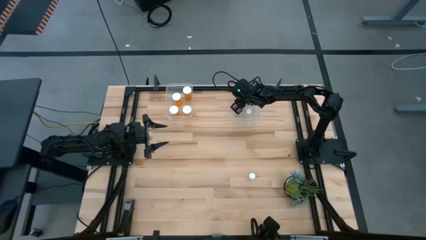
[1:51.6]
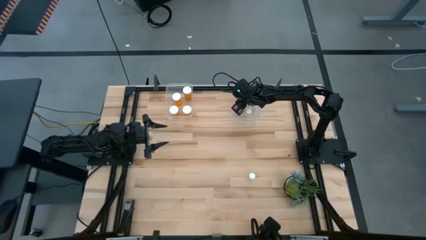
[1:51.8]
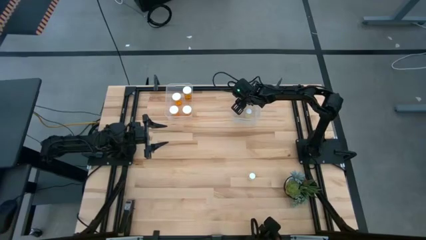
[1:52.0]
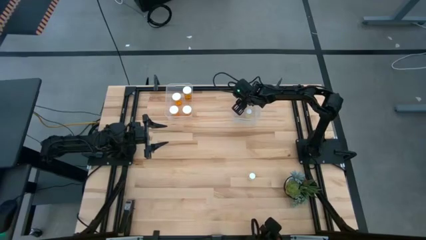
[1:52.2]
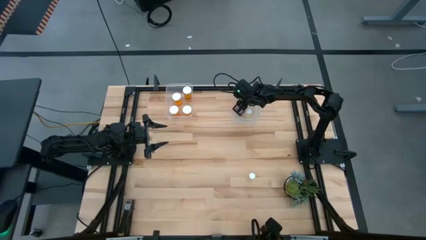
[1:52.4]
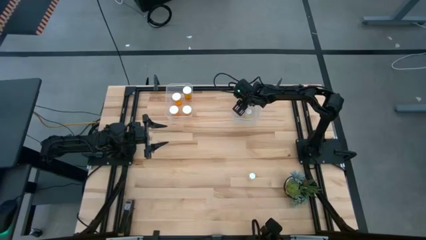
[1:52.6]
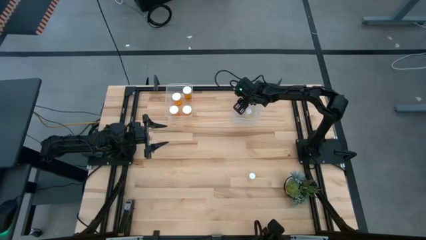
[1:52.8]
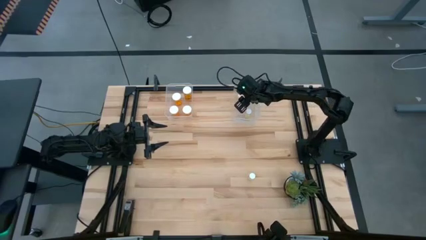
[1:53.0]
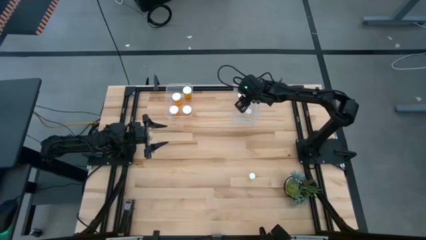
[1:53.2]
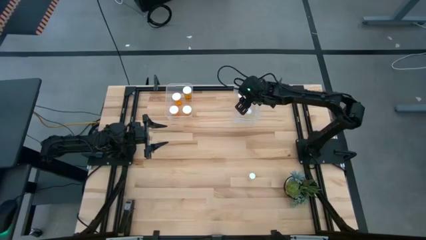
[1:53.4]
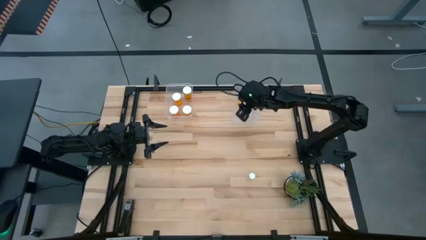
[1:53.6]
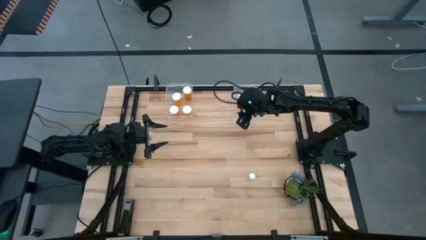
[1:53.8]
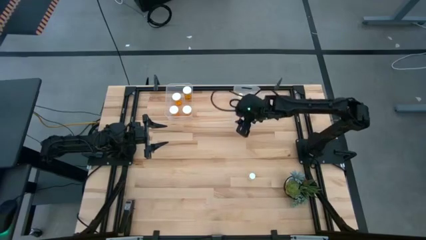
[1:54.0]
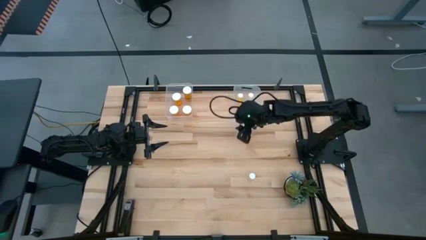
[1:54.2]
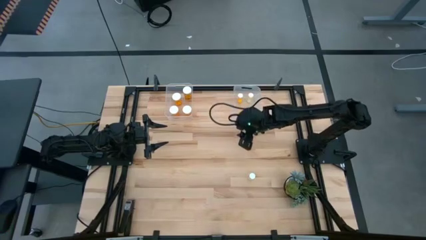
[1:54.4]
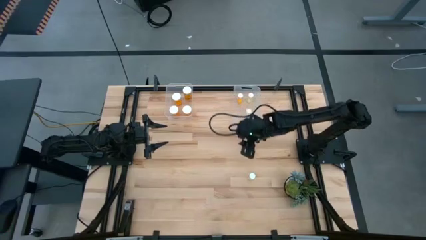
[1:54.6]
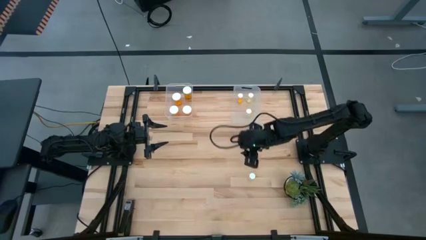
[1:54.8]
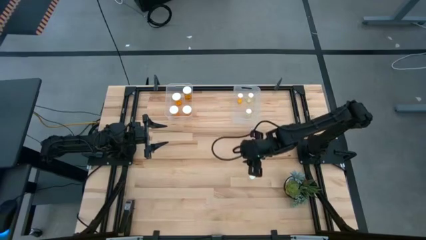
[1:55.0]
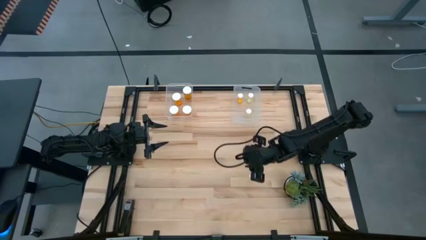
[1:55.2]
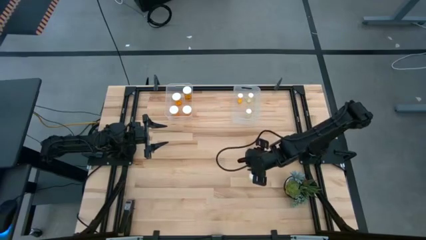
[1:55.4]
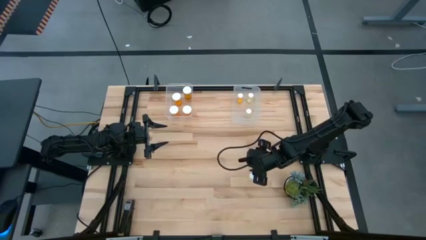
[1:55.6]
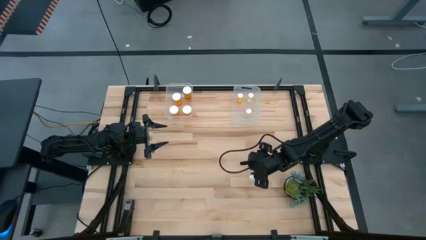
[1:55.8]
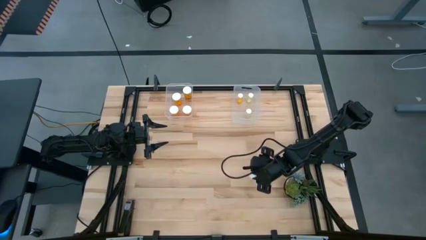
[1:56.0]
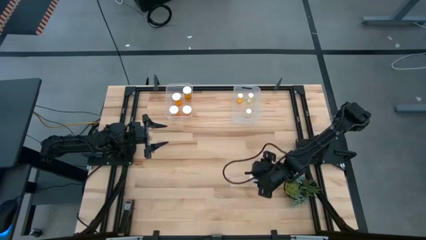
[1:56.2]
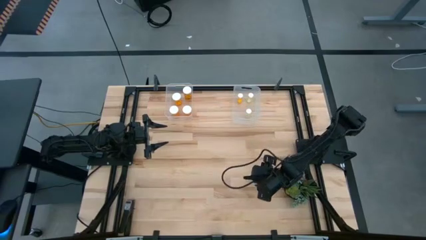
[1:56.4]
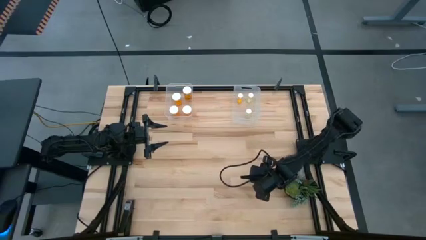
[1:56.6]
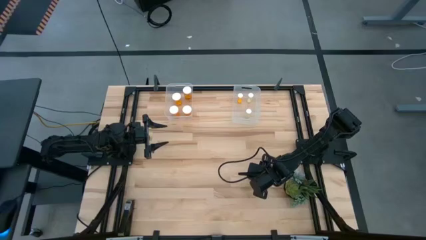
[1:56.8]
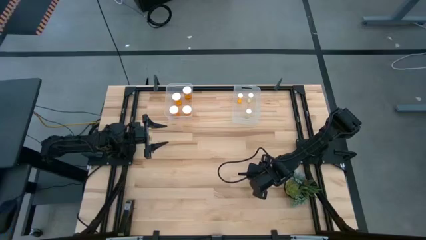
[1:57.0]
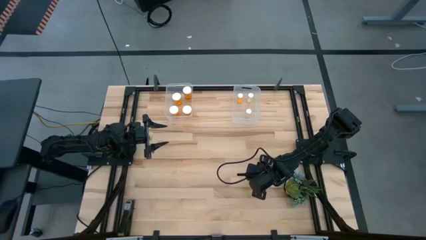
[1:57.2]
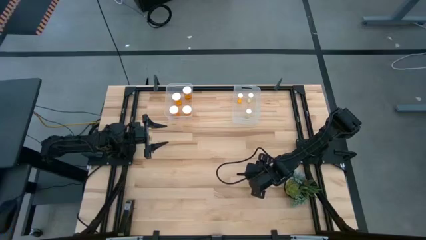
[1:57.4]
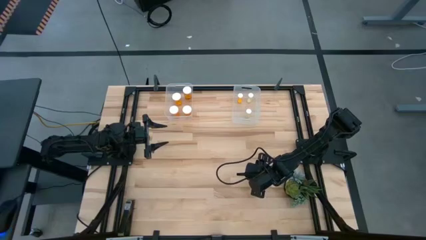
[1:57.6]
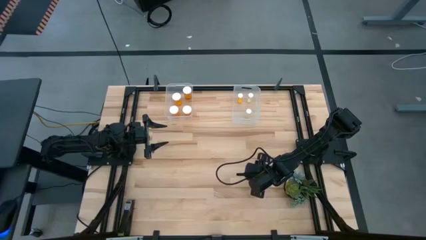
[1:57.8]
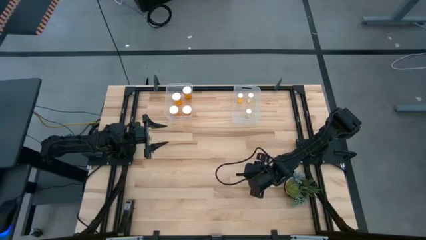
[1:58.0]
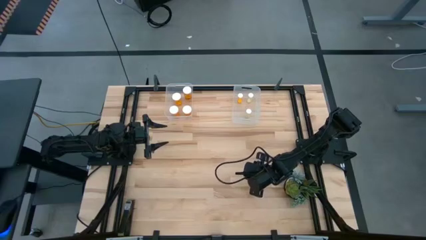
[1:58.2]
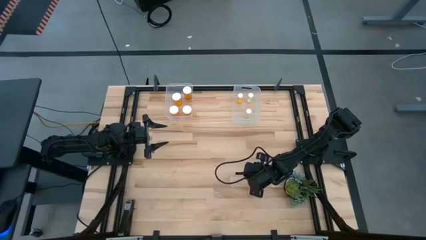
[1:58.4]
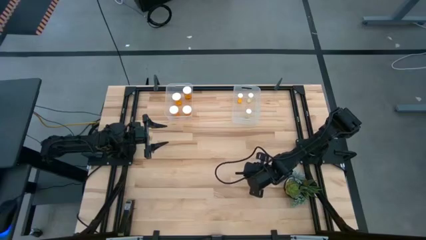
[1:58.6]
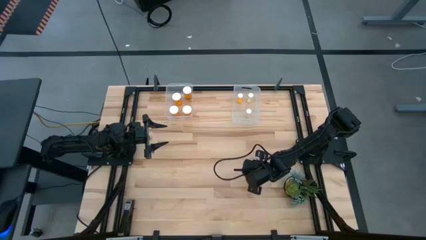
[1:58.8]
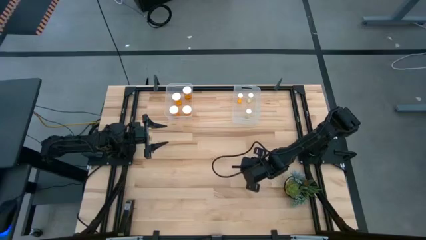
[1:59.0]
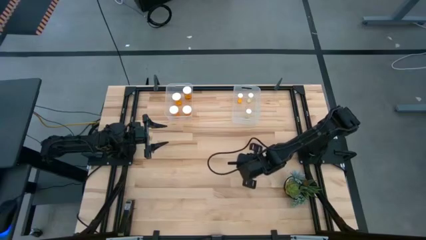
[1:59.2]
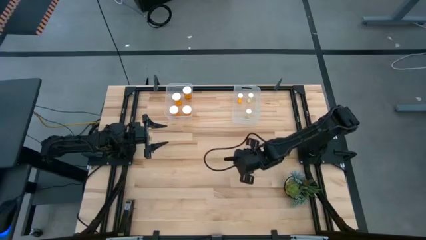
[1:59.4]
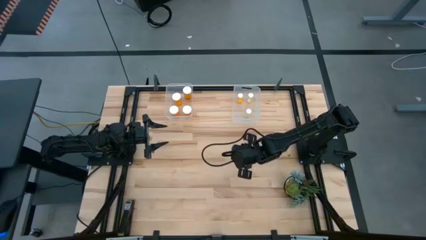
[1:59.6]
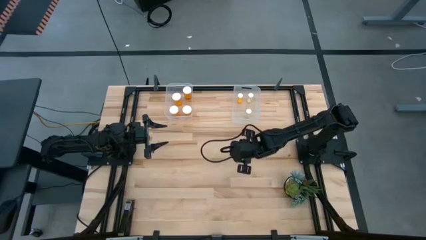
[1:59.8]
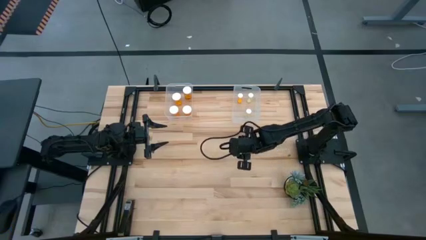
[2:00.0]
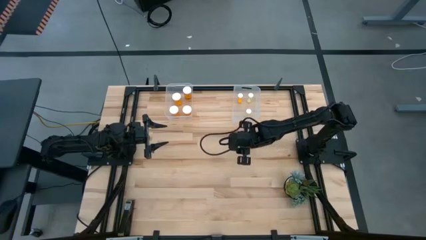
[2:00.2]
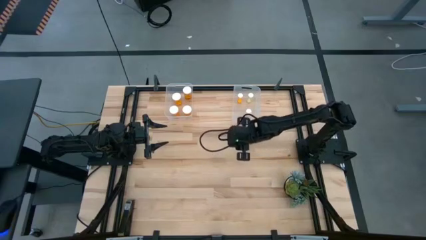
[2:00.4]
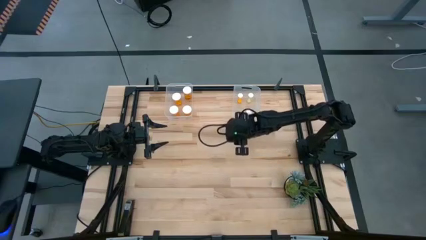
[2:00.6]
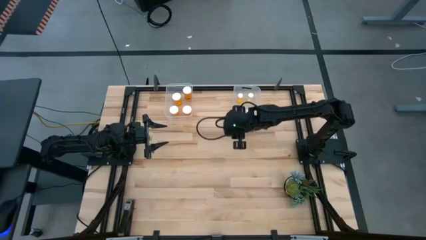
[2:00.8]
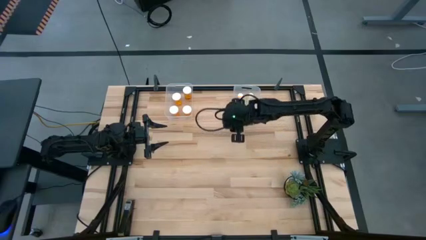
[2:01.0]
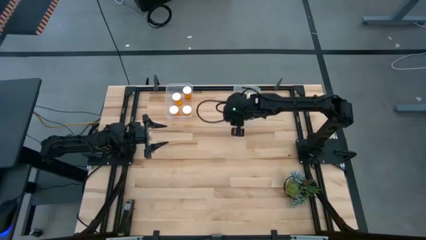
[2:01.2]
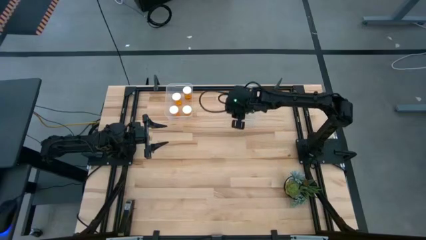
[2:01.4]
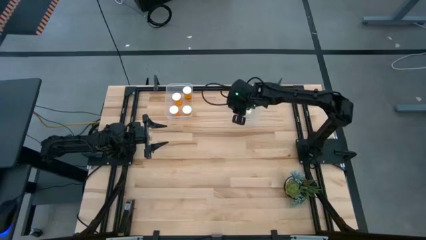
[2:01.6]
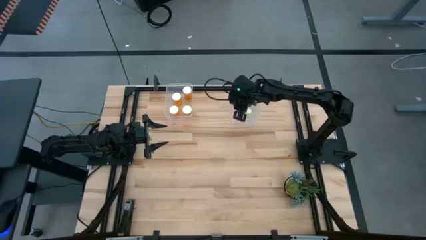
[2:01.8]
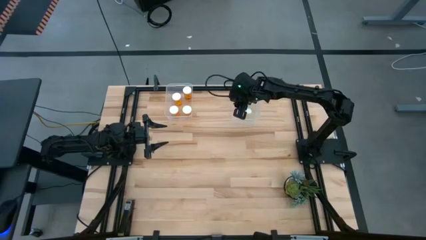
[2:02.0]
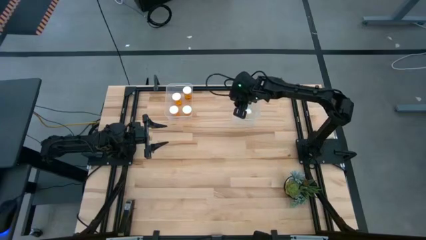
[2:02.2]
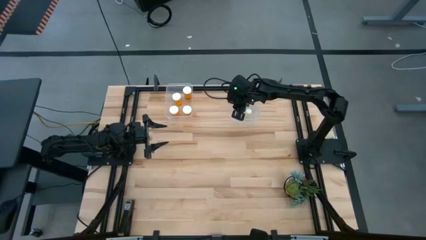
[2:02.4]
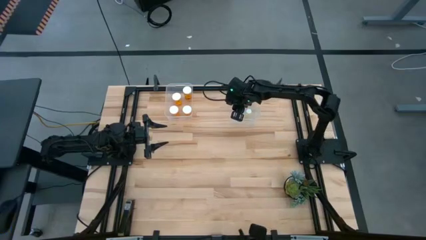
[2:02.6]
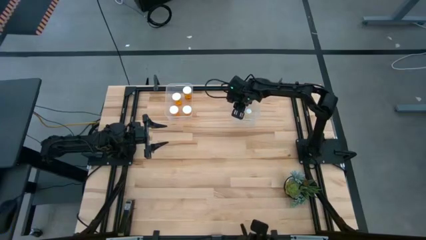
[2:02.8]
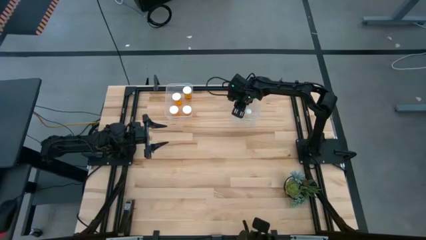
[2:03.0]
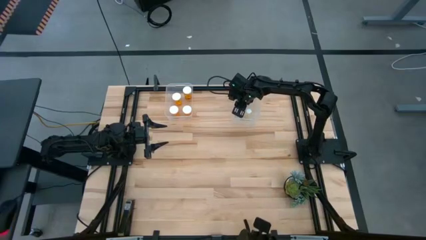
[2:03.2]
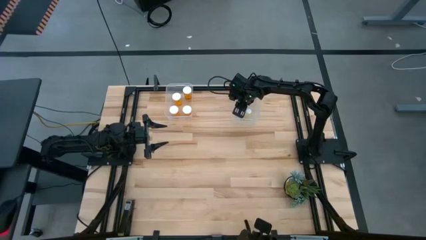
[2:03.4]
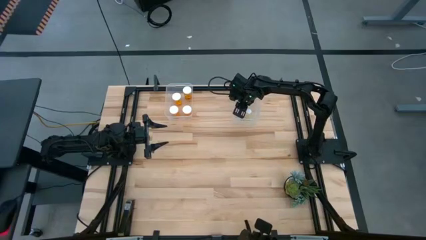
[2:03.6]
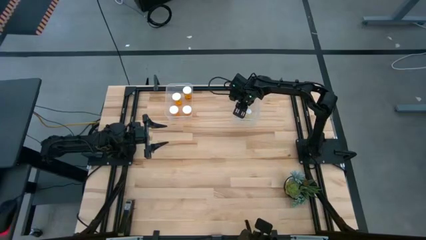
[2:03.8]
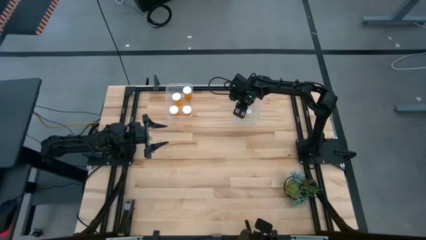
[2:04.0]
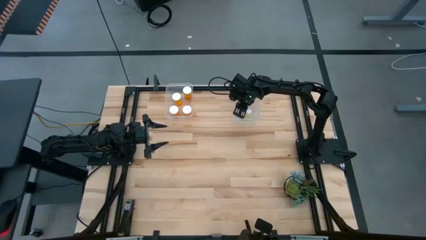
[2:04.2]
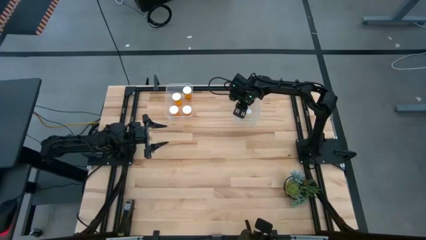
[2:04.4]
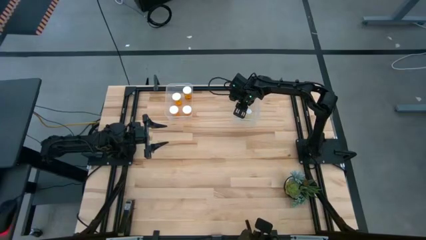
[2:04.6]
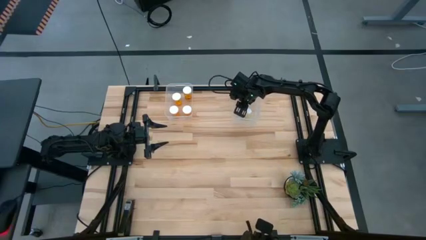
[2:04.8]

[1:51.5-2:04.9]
Task: Pick and place medicine bottles into bin by pill shape (circle, oval)
Put the small yellow pill bottle into the right transparent bin

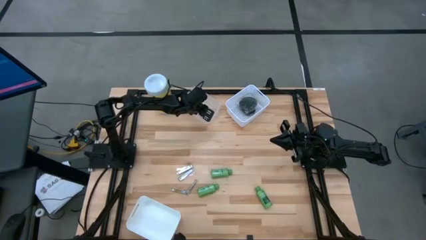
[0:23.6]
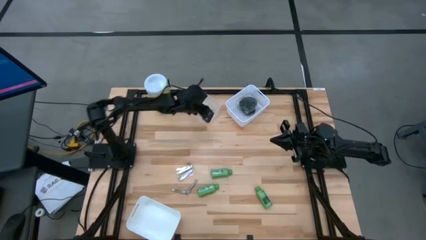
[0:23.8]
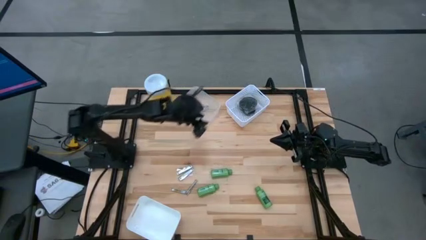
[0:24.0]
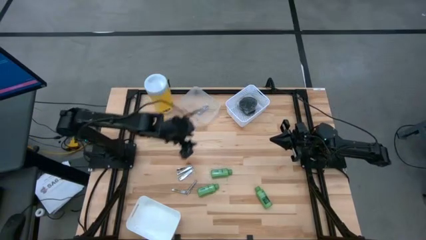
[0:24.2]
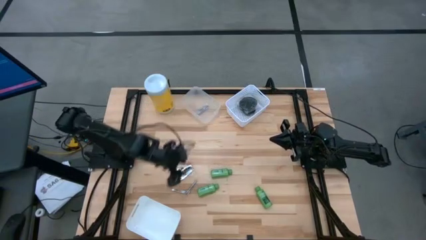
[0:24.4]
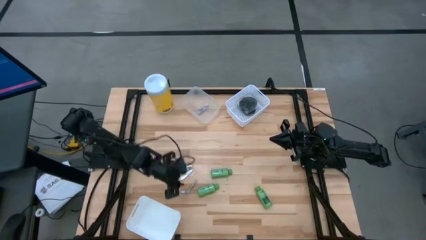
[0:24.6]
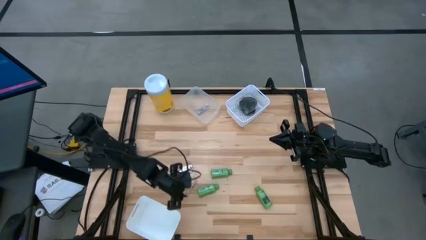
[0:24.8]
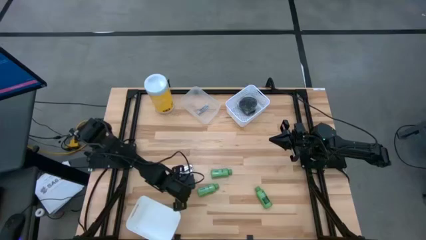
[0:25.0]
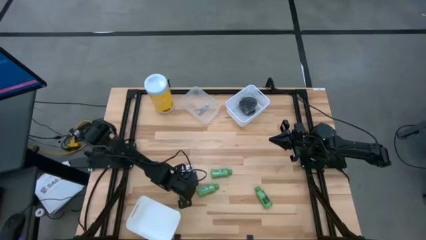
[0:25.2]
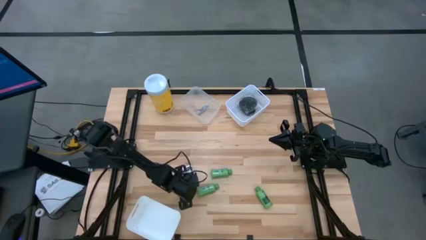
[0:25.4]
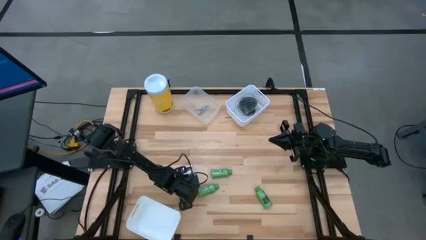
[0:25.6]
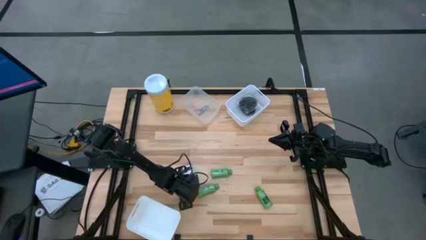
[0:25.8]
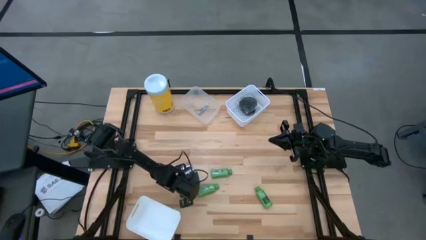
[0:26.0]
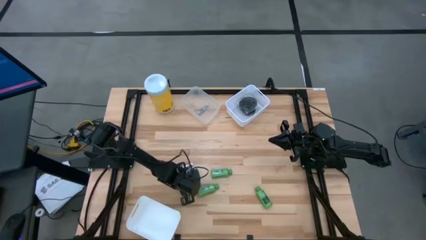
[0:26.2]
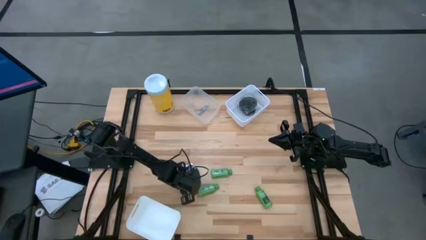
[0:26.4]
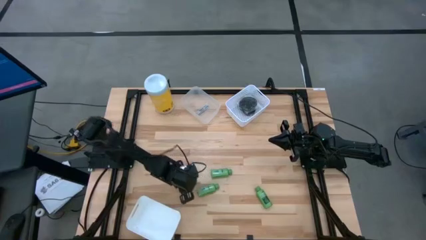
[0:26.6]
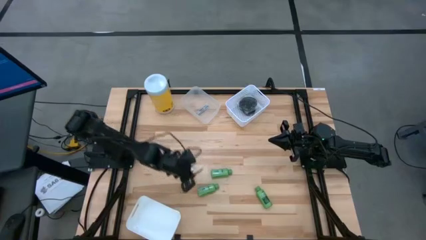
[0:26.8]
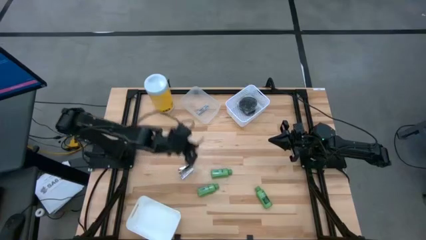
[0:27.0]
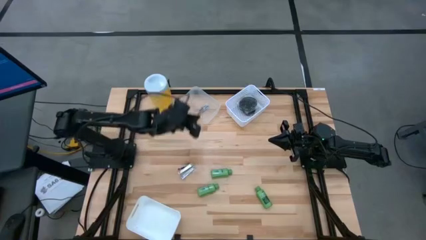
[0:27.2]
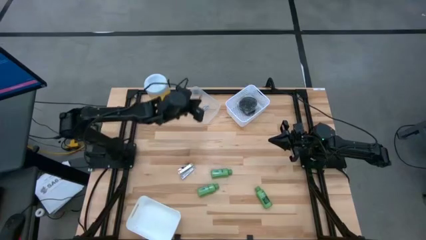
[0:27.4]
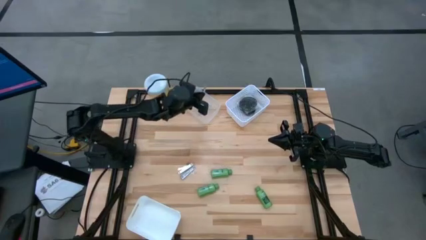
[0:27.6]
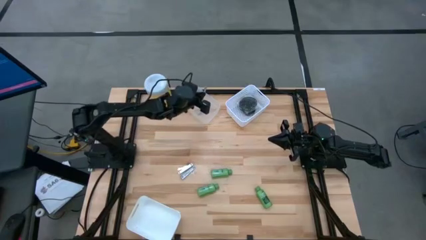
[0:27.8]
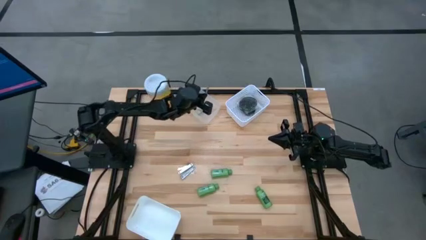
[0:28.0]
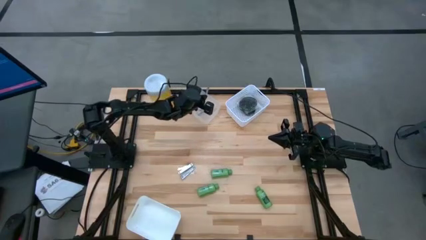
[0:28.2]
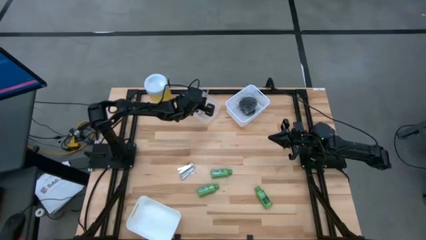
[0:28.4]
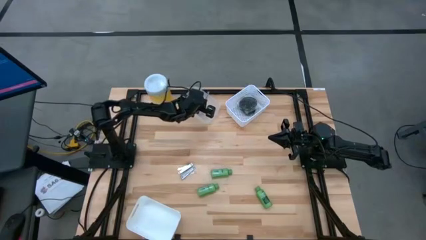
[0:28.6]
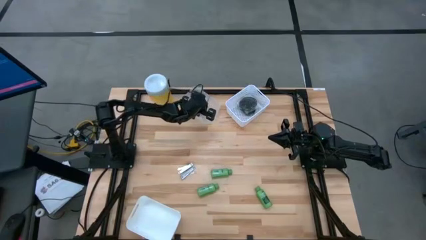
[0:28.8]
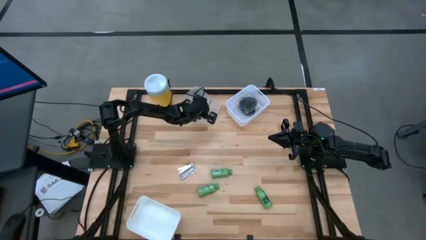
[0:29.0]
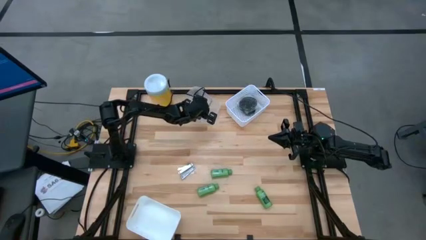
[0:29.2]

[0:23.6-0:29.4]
Task: Pick & Place Travel size toiletries
Put the silver nail cutter into the transparent bin
